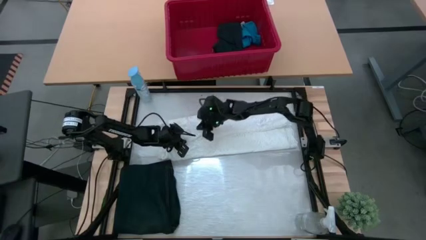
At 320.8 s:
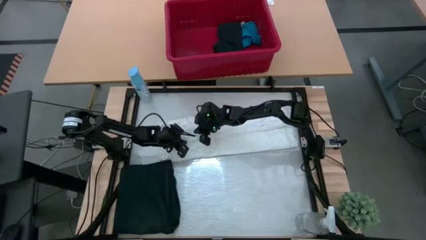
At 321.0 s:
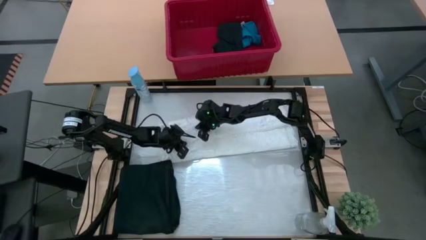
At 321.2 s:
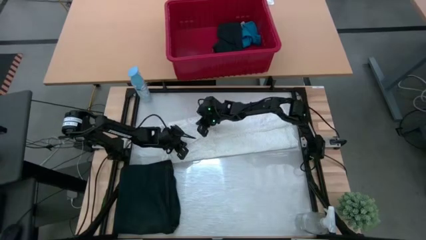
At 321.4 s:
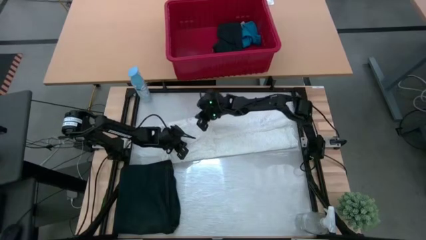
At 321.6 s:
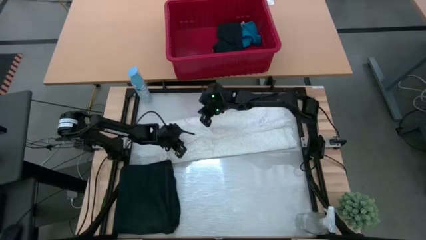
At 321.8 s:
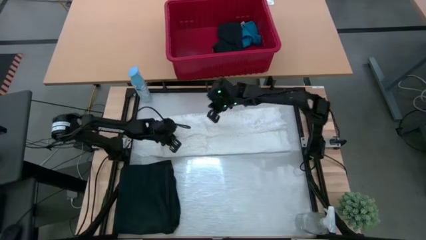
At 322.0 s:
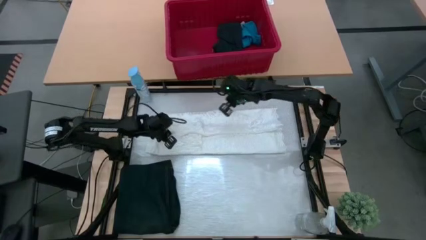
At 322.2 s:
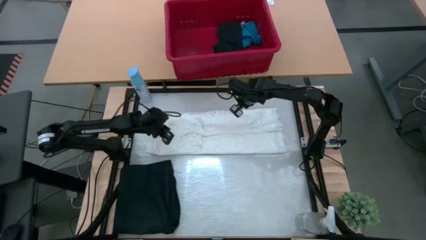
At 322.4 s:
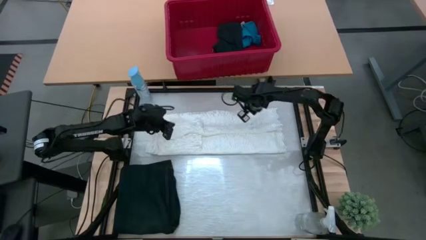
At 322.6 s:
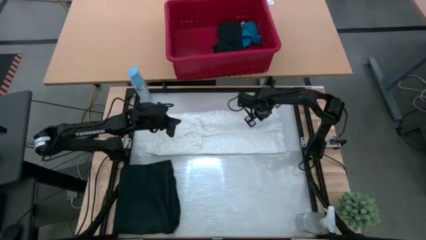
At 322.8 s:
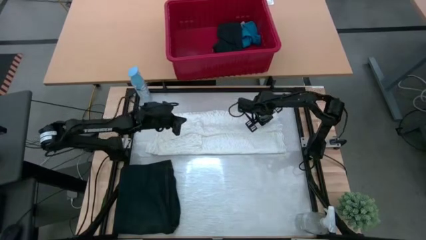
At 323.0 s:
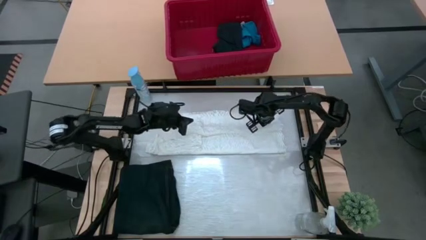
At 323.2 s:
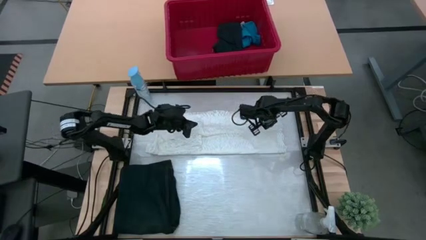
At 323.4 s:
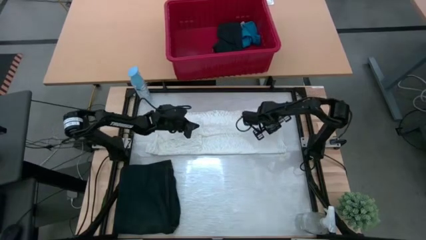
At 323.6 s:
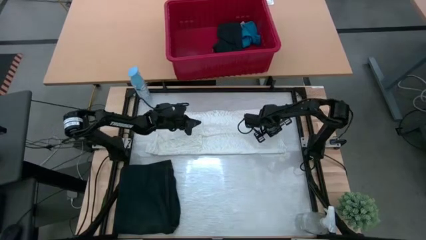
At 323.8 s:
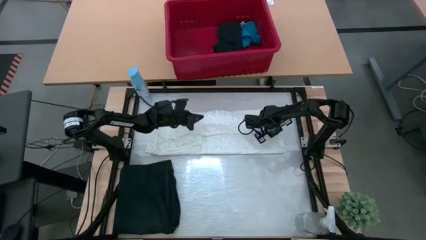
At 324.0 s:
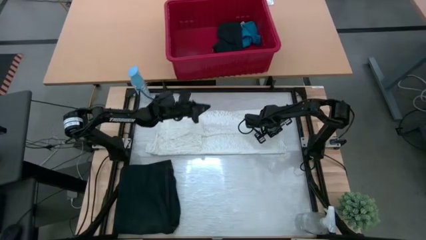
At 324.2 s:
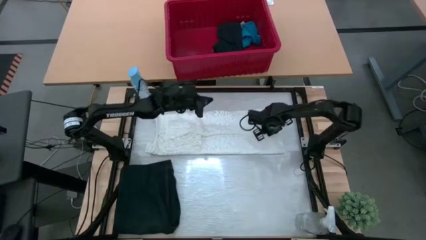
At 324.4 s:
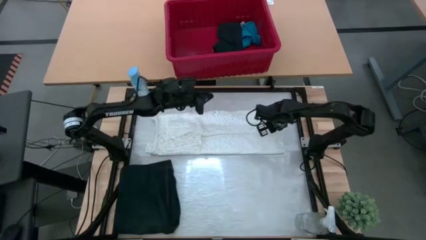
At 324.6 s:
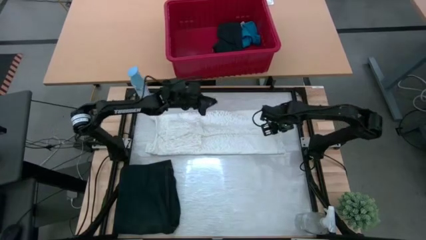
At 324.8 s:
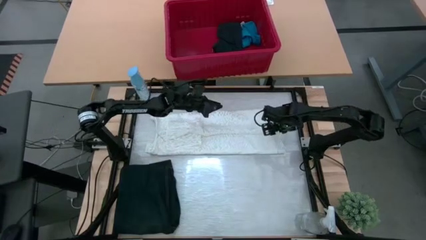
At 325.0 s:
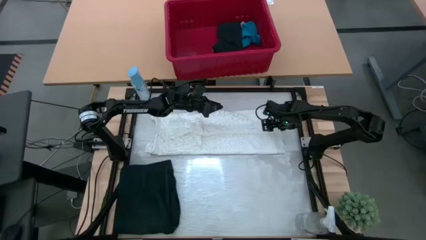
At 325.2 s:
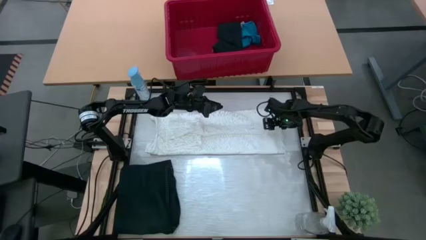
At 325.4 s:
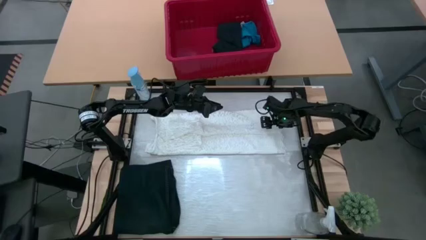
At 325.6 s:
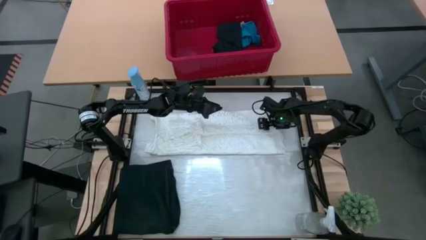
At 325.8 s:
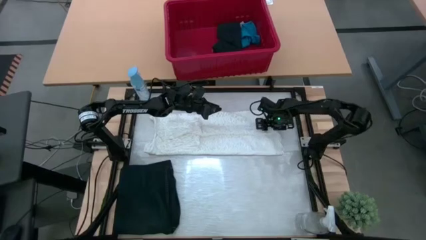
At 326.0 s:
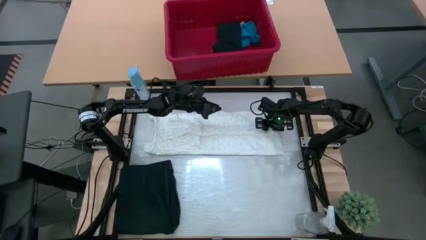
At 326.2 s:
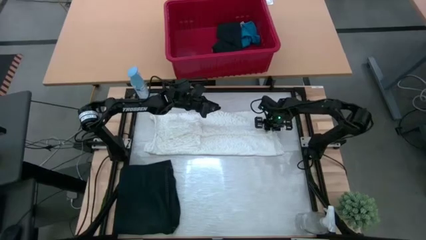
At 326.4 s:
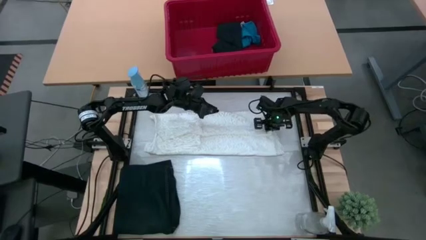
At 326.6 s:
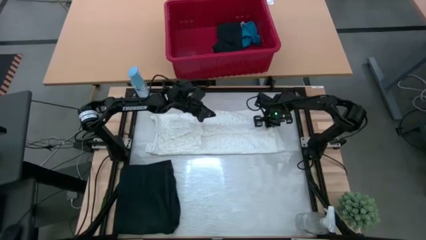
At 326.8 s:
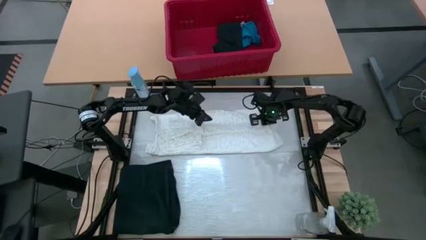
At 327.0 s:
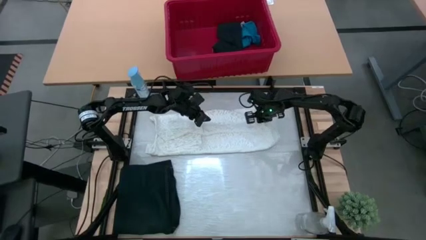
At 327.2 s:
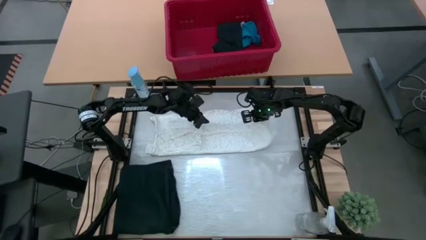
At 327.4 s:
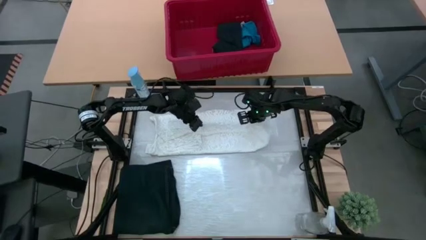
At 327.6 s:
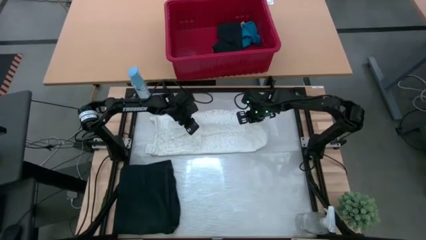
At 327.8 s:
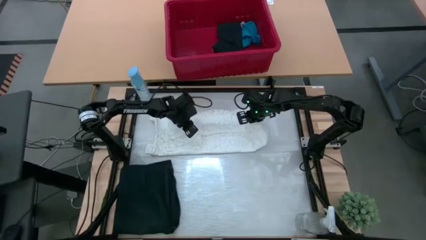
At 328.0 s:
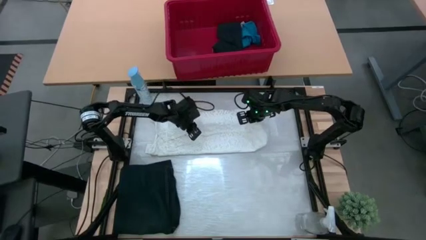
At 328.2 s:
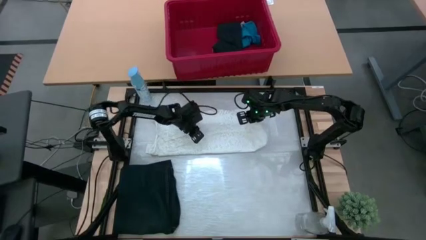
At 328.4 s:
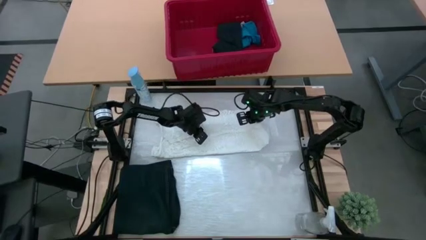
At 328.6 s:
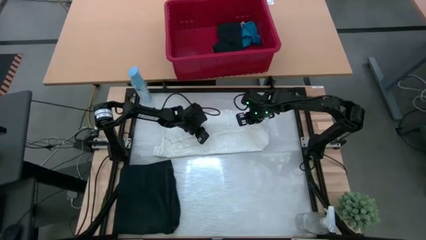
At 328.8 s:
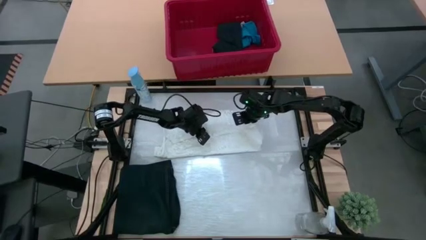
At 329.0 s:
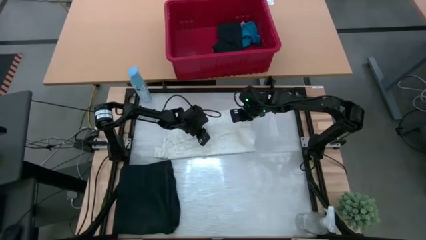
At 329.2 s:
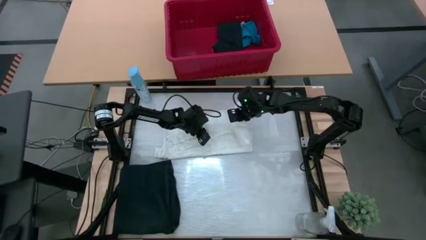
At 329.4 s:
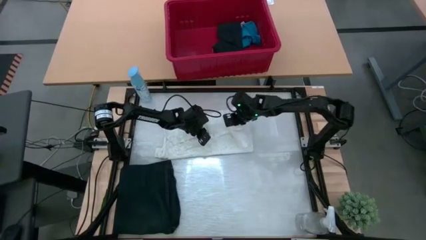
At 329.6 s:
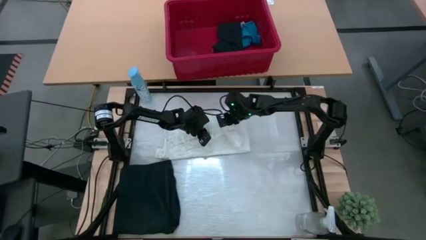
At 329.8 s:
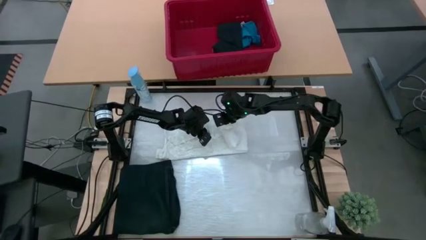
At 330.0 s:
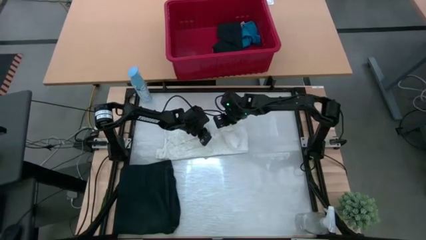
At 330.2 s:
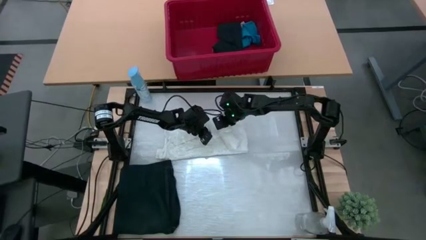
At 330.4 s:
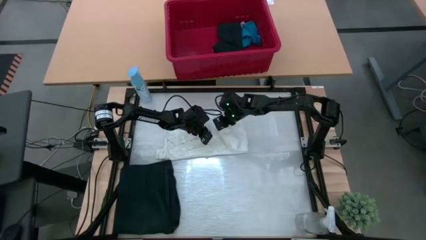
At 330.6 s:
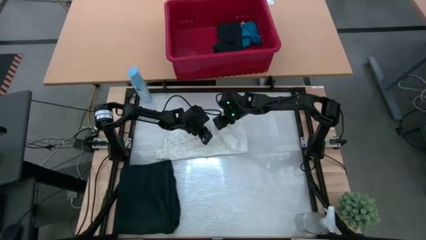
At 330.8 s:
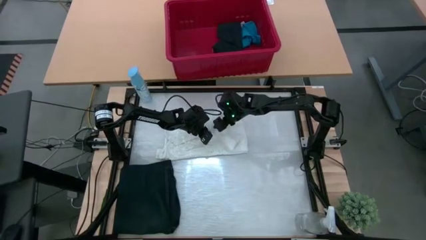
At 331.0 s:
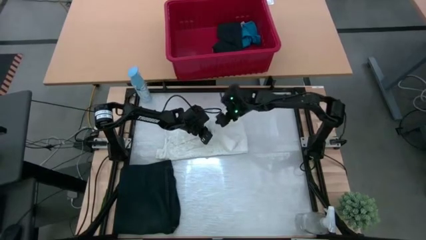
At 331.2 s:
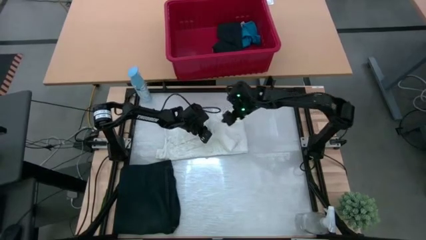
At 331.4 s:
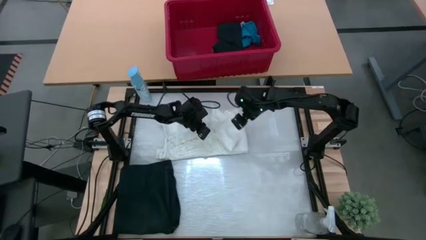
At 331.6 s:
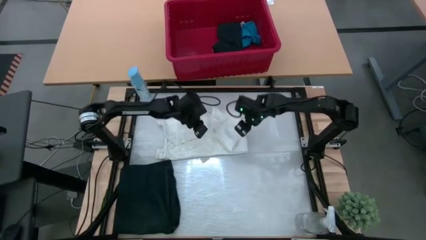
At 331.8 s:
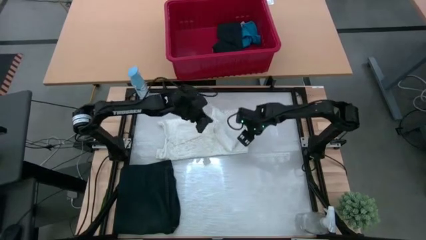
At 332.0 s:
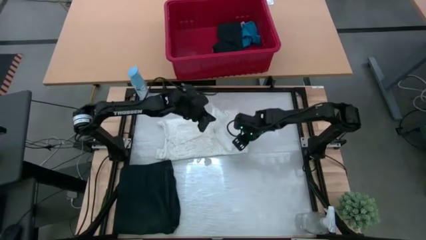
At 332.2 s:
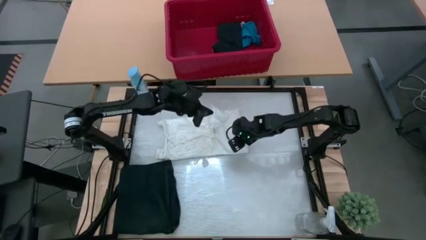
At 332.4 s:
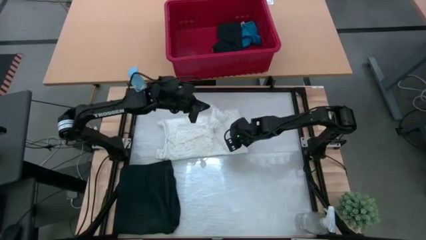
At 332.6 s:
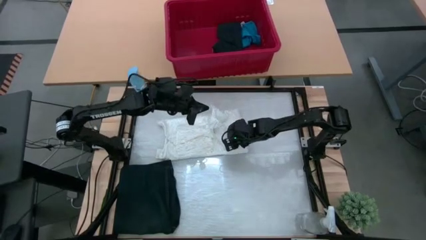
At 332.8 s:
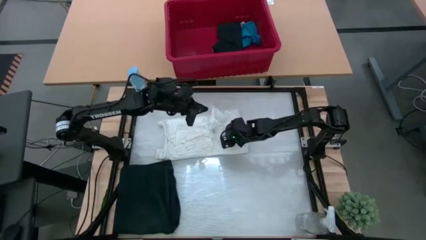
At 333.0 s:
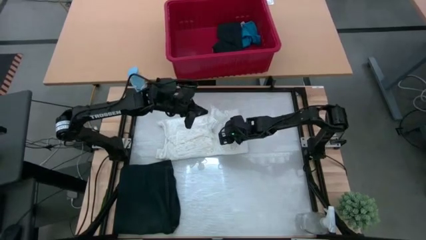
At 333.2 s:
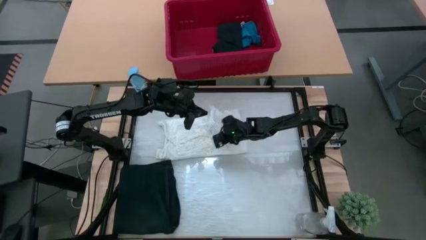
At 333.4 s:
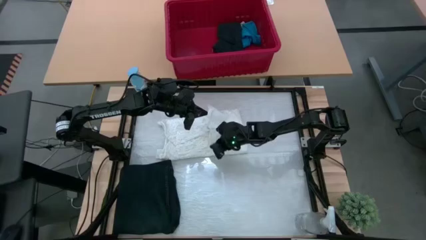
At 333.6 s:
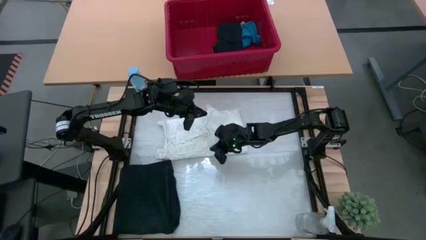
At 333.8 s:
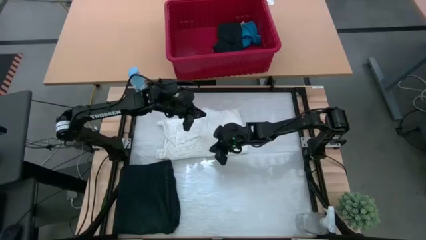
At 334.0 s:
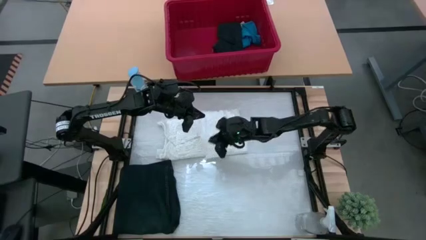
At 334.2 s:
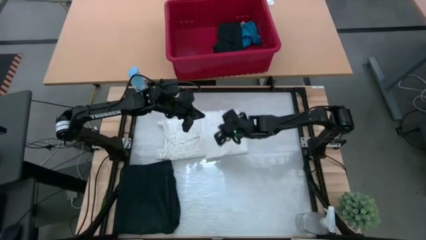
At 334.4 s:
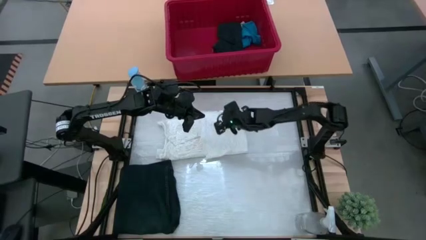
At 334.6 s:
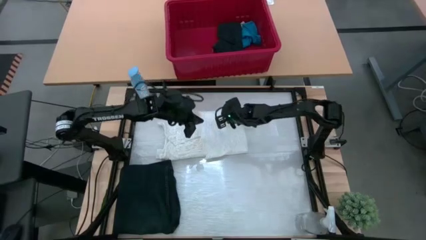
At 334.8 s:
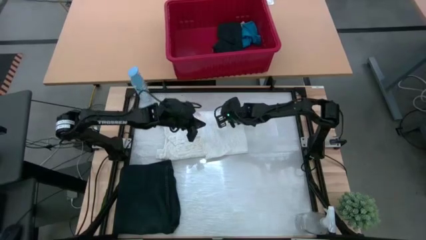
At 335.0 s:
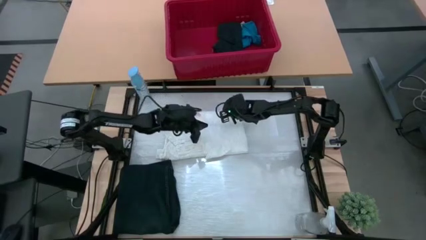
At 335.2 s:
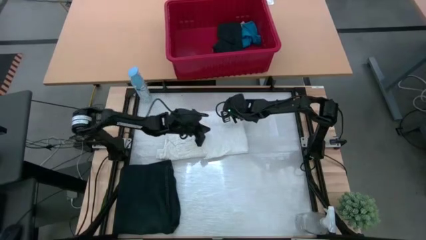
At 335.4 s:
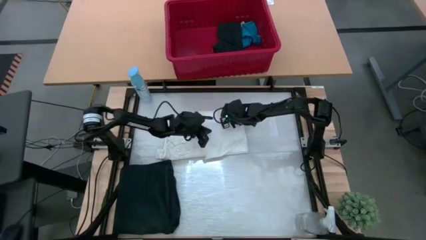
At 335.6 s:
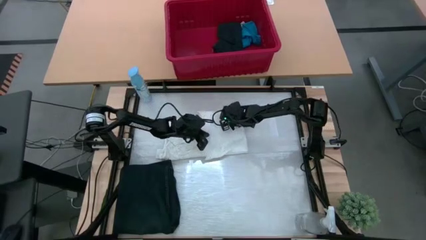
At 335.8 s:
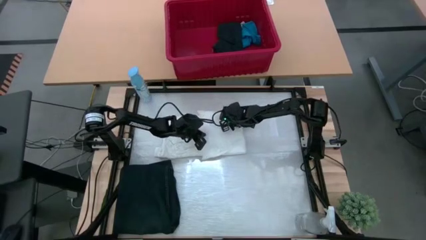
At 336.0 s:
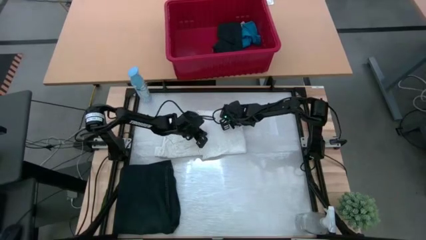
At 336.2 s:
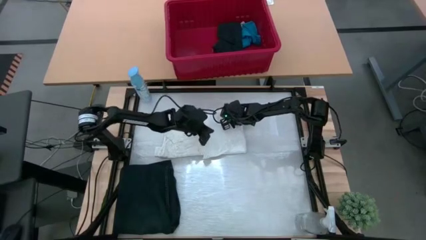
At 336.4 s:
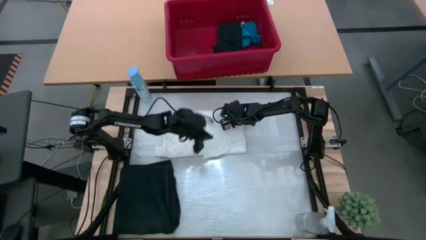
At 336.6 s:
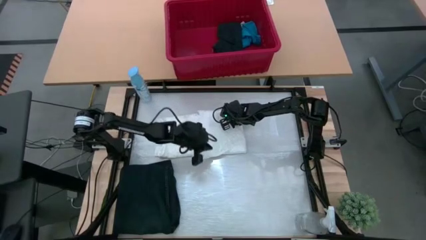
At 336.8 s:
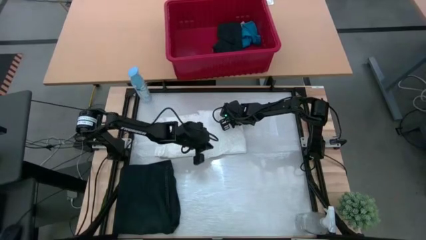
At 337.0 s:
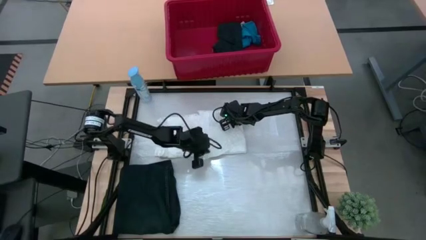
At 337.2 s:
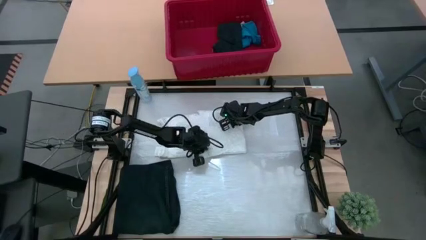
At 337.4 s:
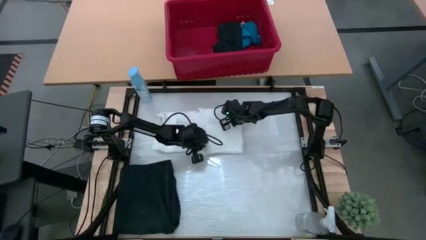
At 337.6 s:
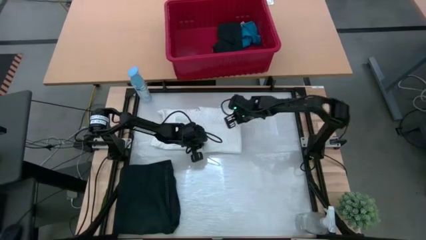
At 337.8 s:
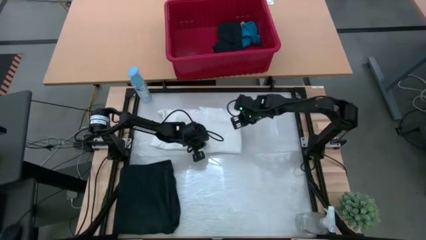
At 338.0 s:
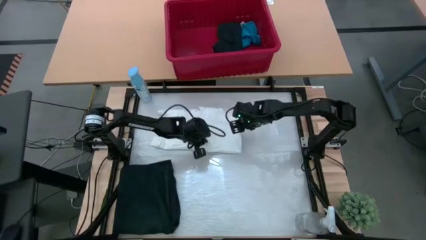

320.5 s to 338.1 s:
Task: Fold Laundry from Bin
Fold the white dress from the red bin
